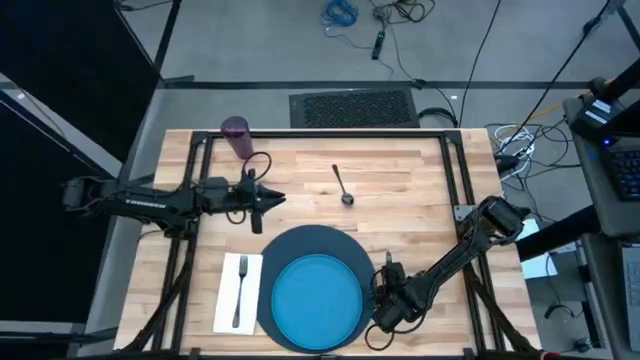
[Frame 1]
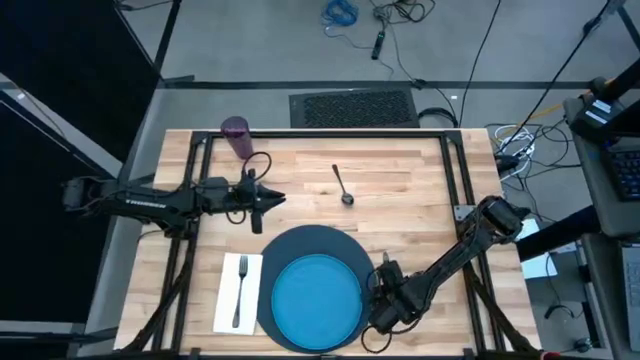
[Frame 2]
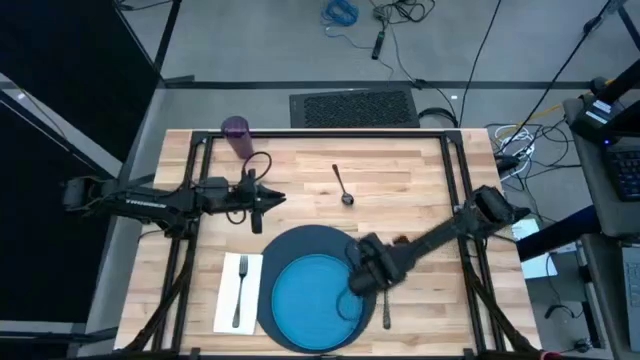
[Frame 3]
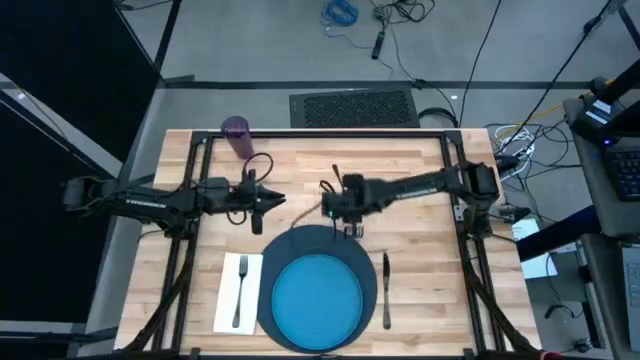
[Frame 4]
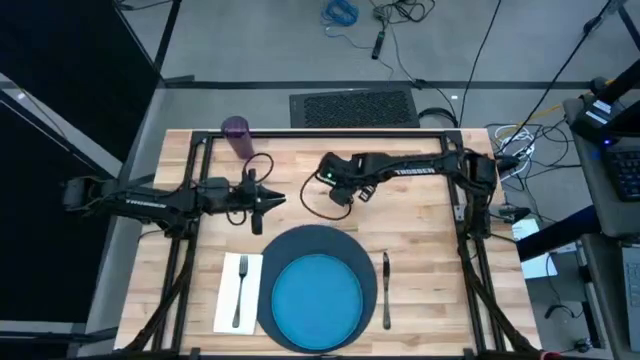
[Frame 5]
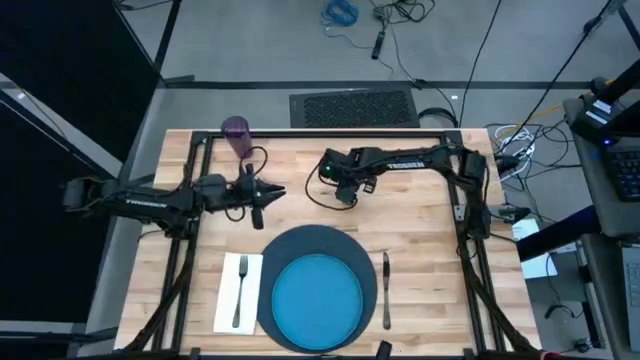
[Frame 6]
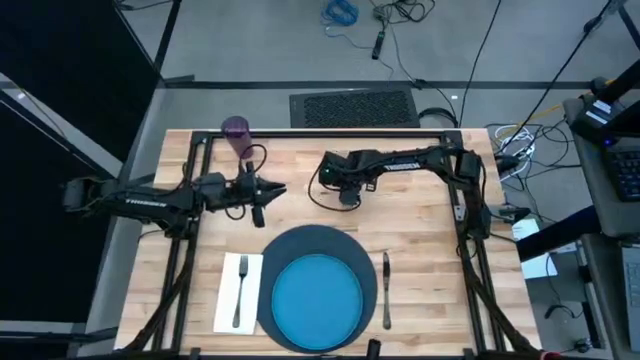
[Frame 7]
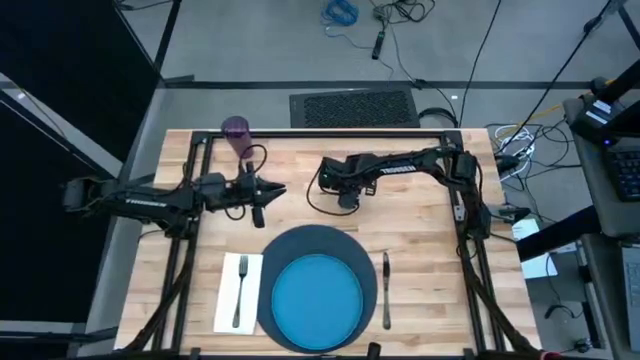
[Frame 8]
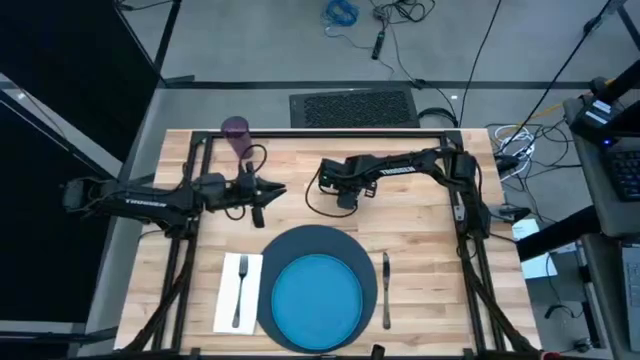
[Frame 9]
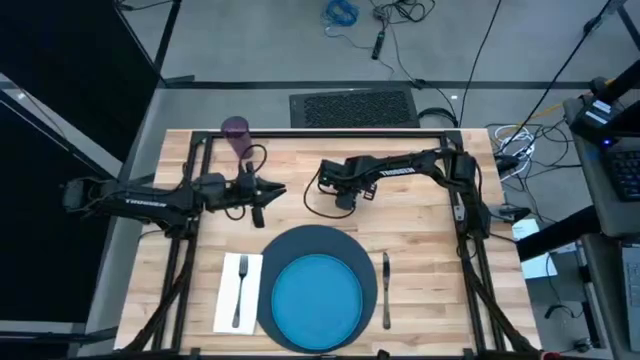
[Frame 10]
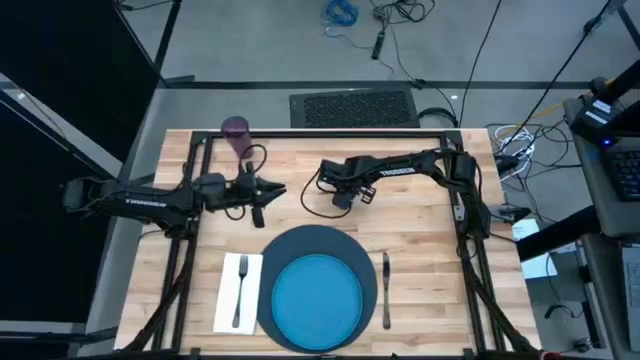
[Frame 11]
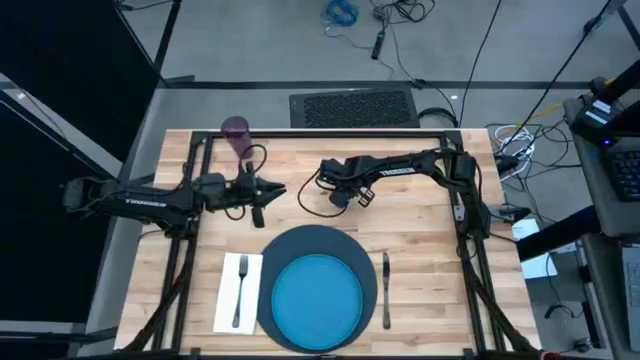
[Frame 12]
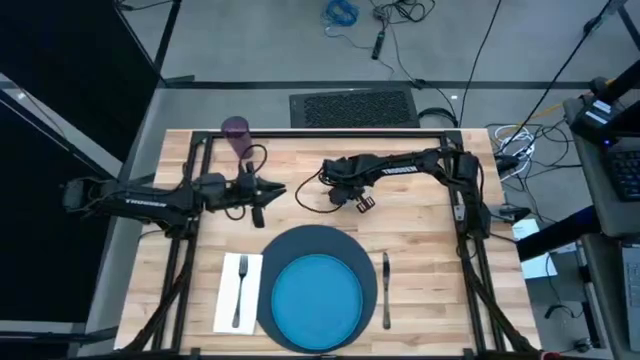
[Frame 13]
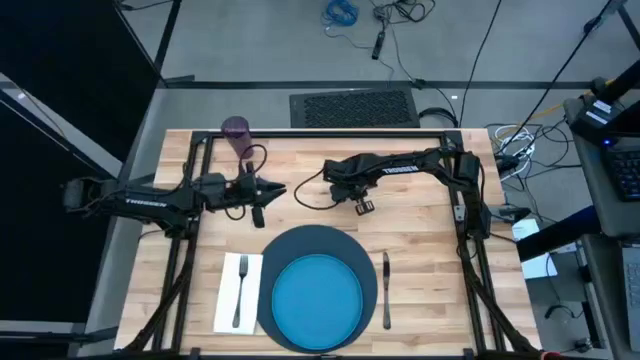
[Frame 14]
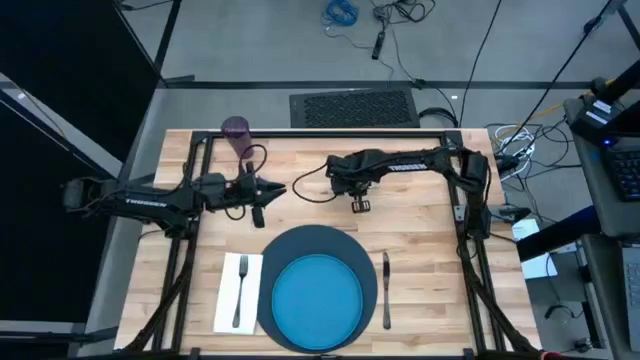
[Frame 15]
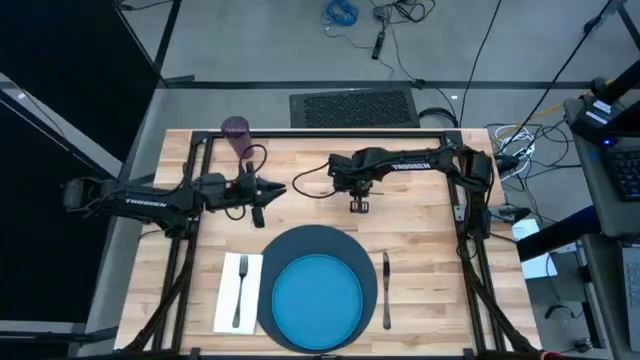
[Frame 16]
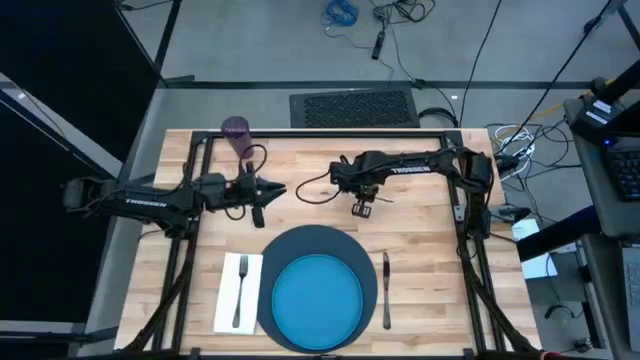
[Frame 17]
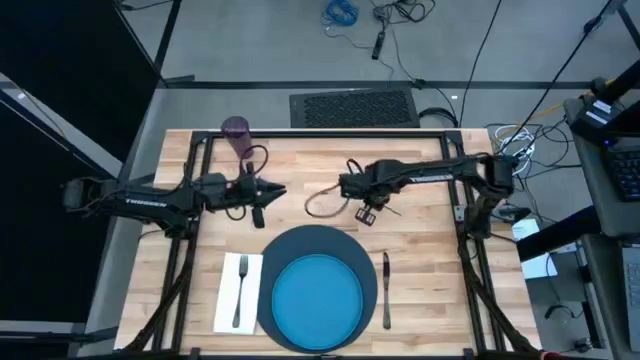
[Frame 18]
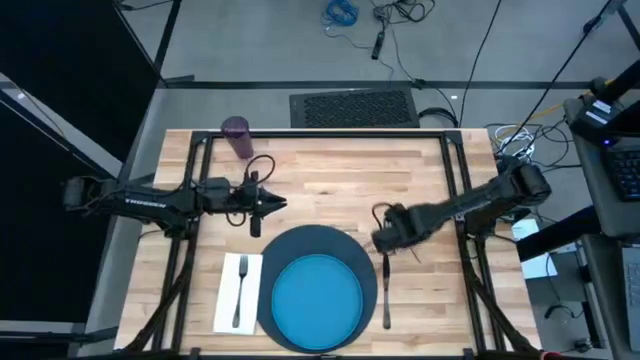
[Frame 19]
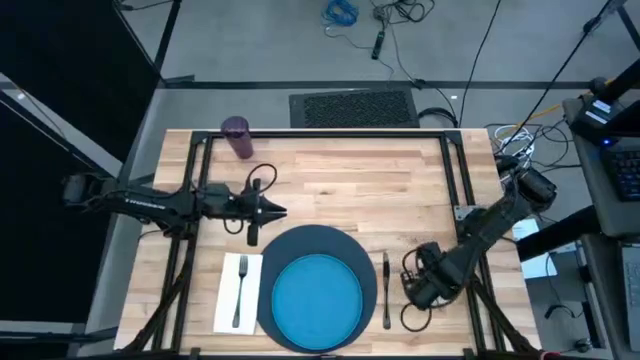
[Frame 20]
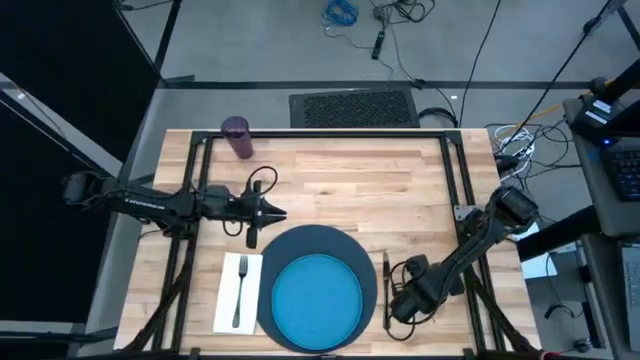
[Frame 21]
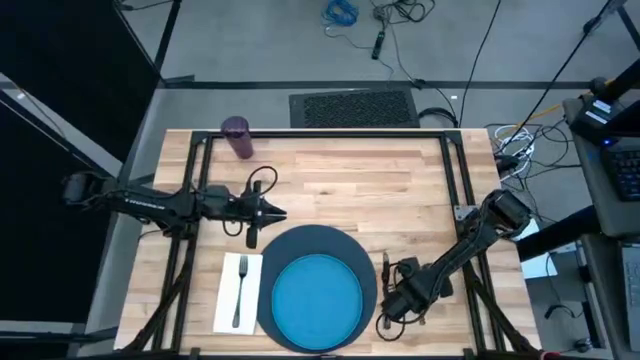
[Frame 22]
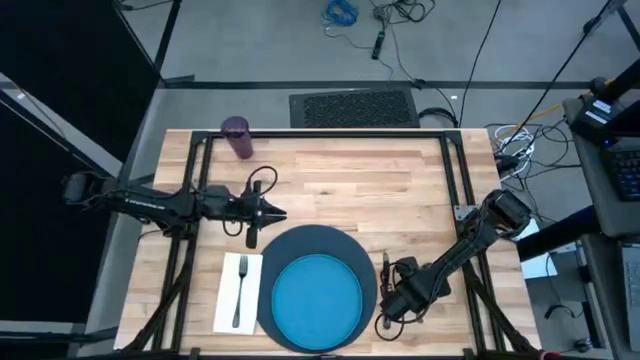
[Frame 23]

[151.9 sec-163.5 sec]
Task: Set table place
Put the silver spoon on the middle right of the table
